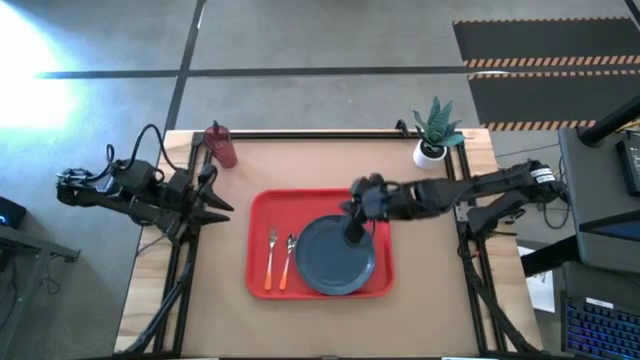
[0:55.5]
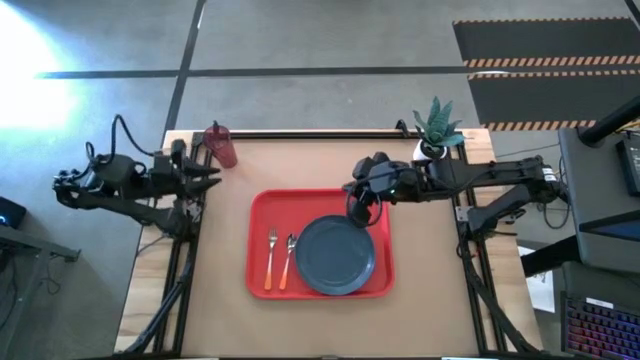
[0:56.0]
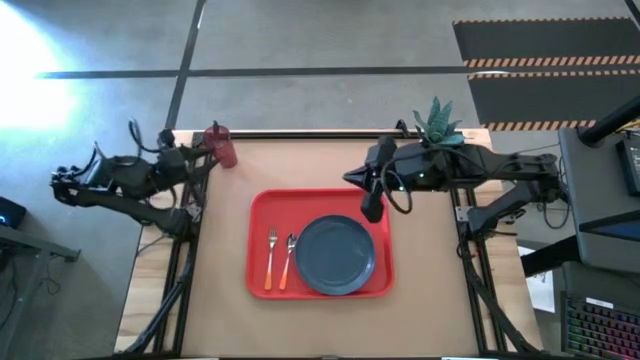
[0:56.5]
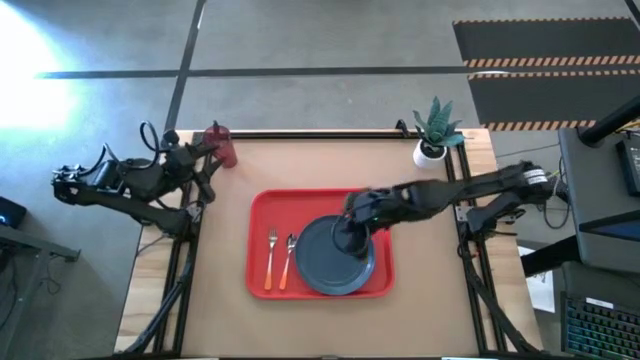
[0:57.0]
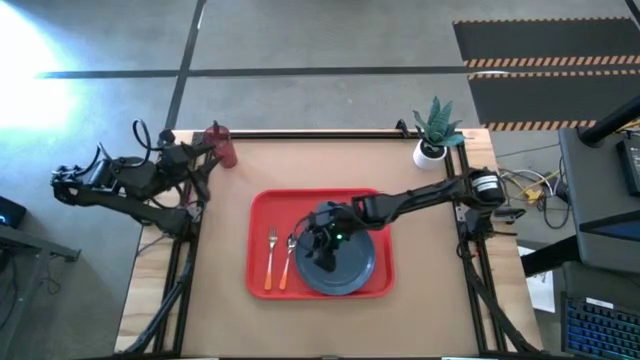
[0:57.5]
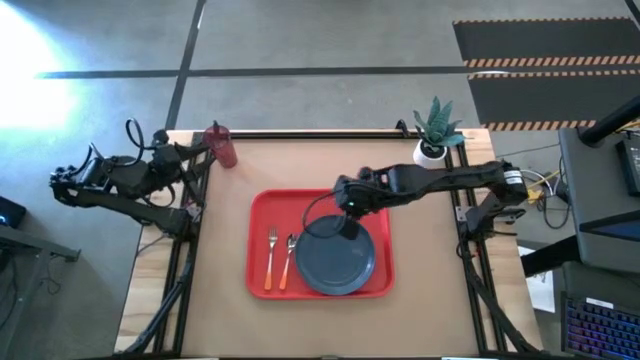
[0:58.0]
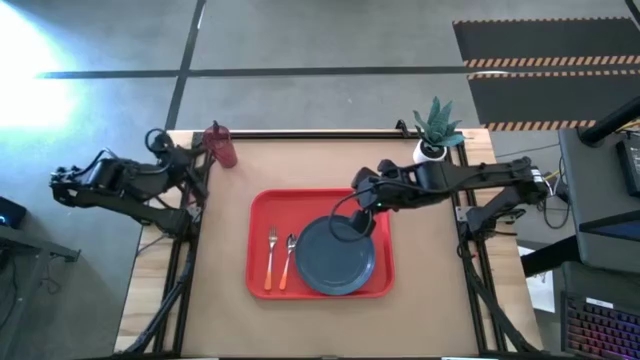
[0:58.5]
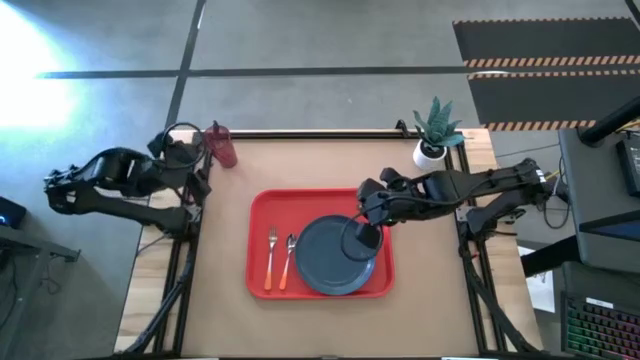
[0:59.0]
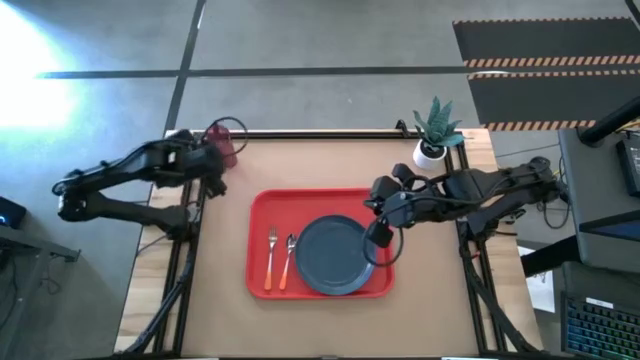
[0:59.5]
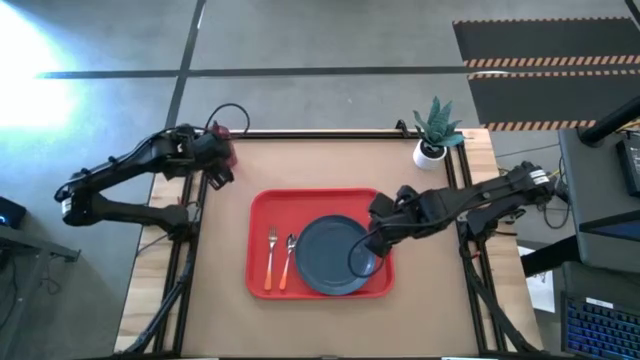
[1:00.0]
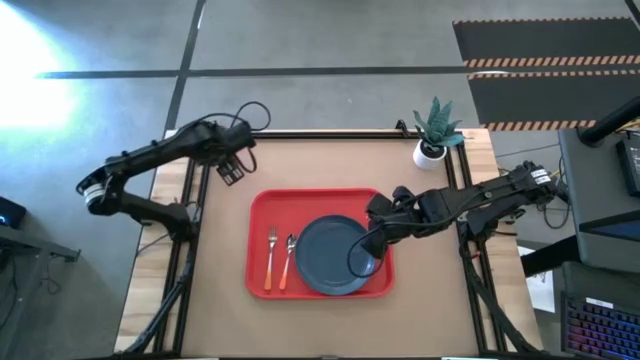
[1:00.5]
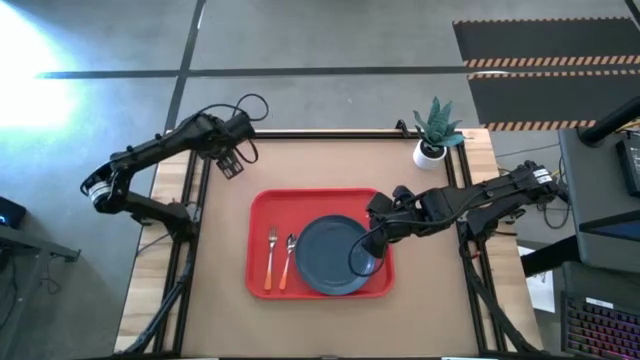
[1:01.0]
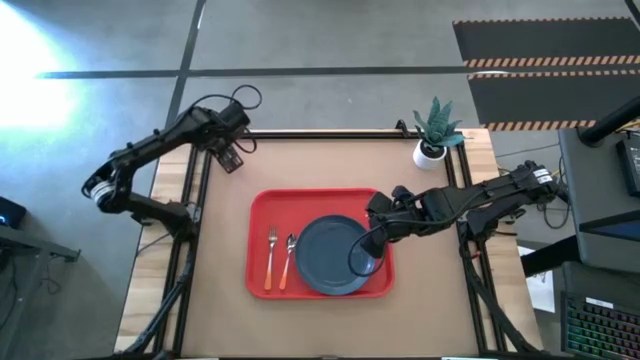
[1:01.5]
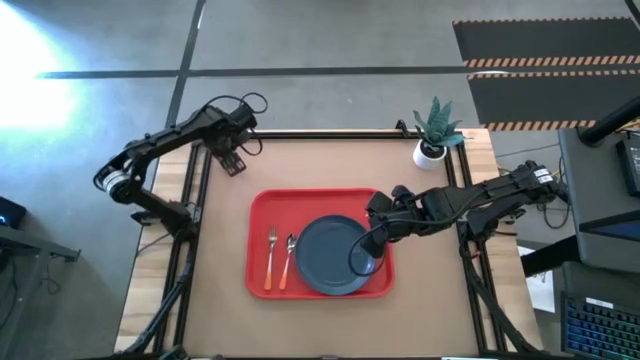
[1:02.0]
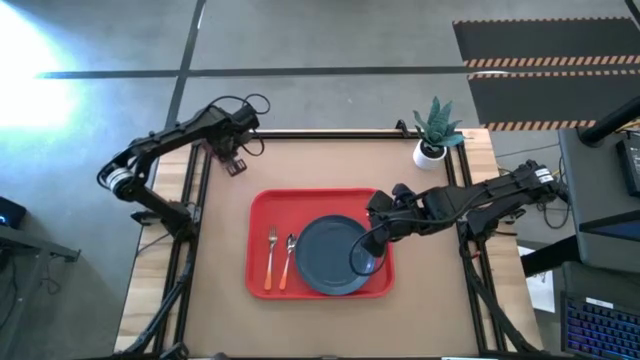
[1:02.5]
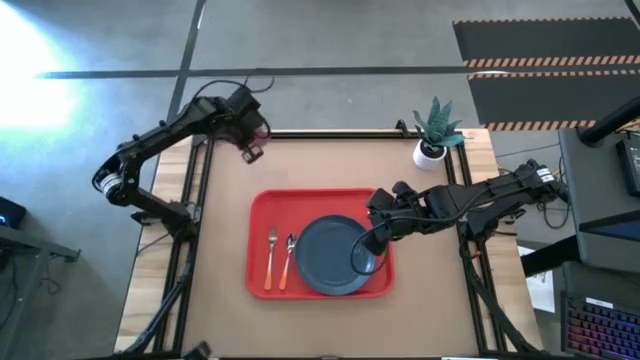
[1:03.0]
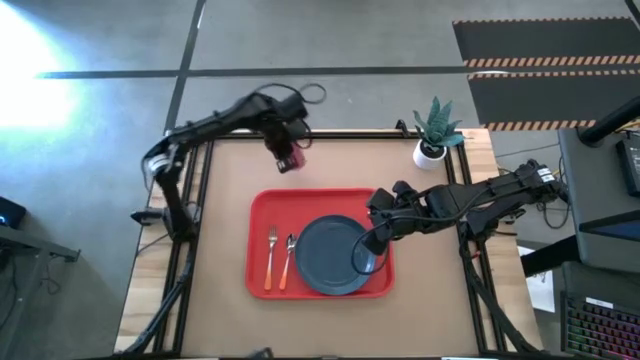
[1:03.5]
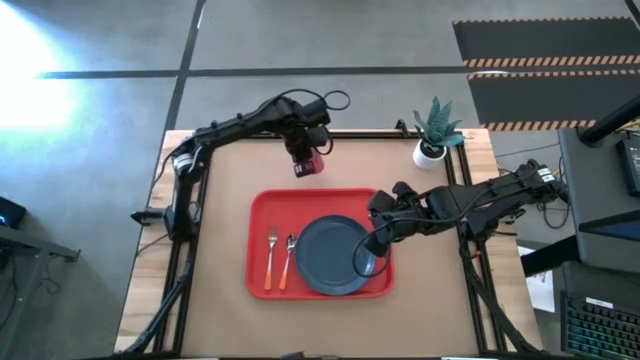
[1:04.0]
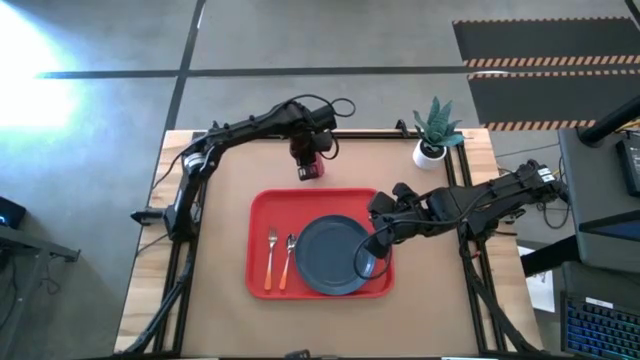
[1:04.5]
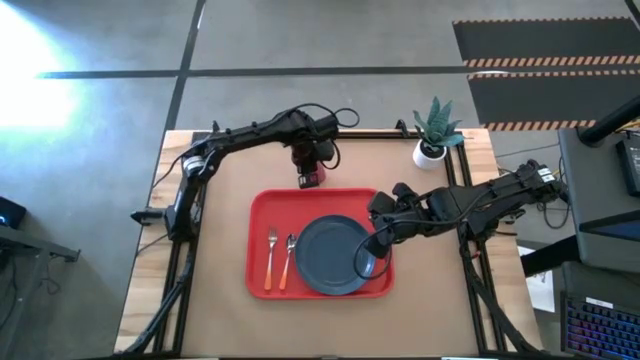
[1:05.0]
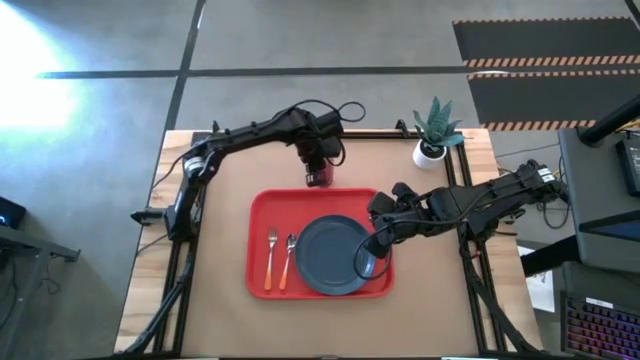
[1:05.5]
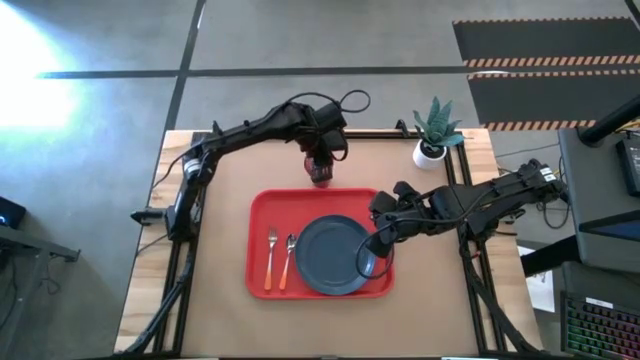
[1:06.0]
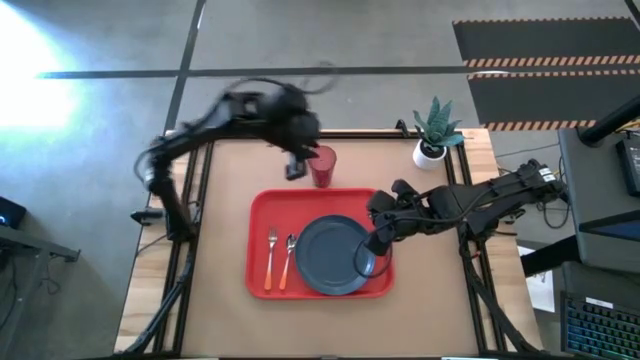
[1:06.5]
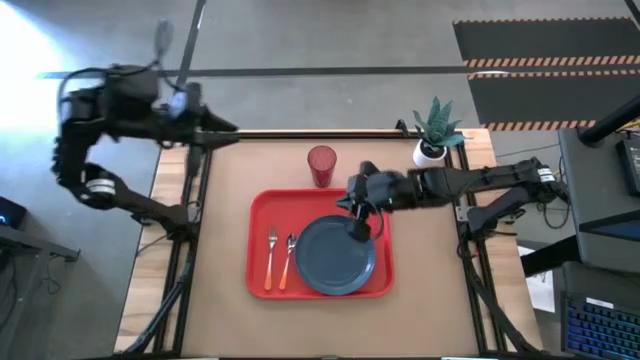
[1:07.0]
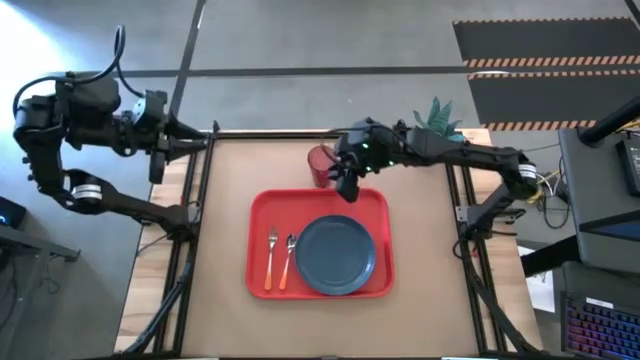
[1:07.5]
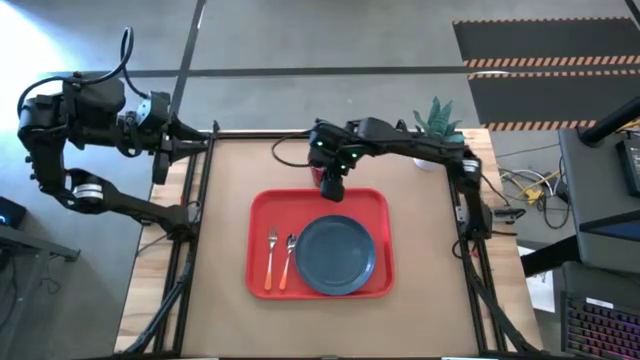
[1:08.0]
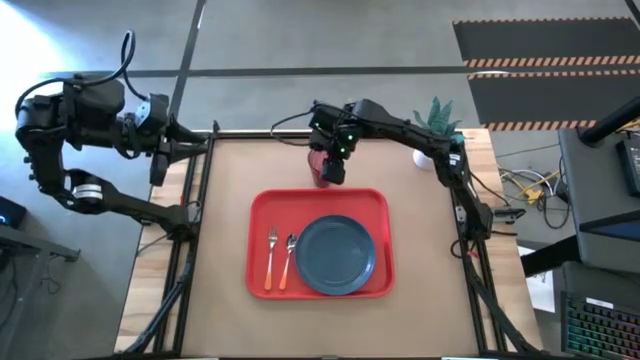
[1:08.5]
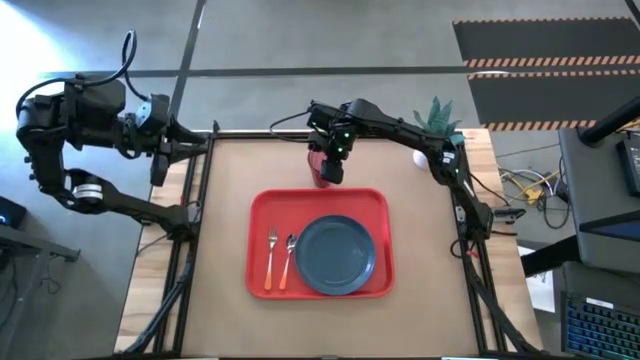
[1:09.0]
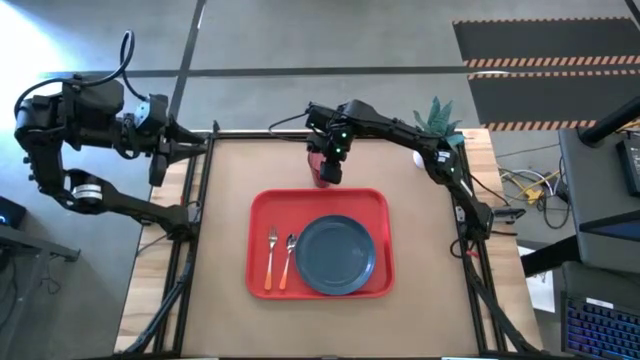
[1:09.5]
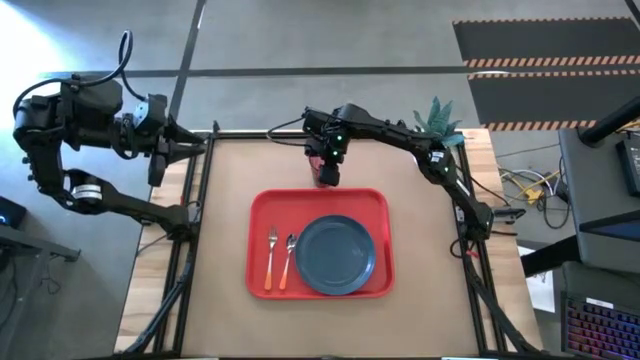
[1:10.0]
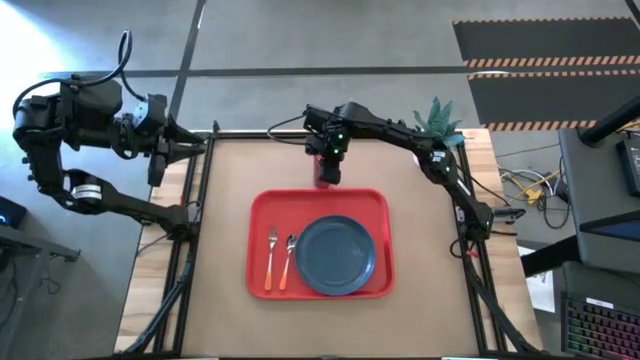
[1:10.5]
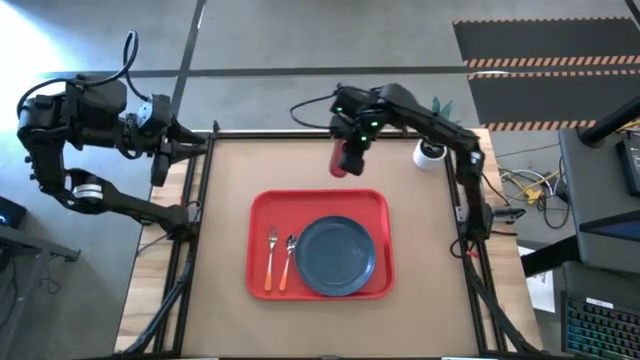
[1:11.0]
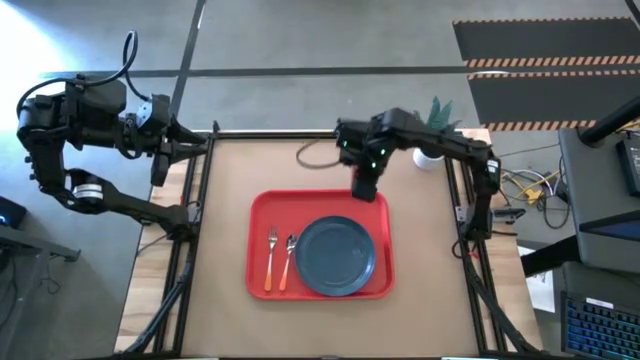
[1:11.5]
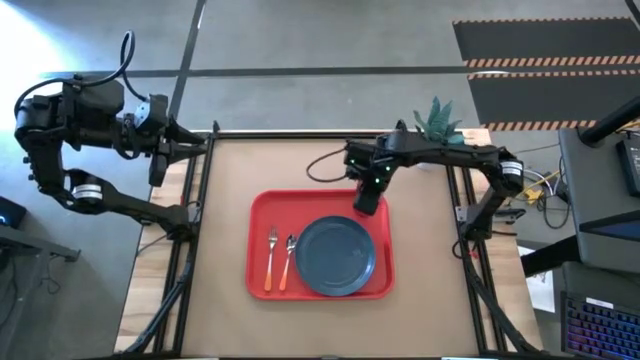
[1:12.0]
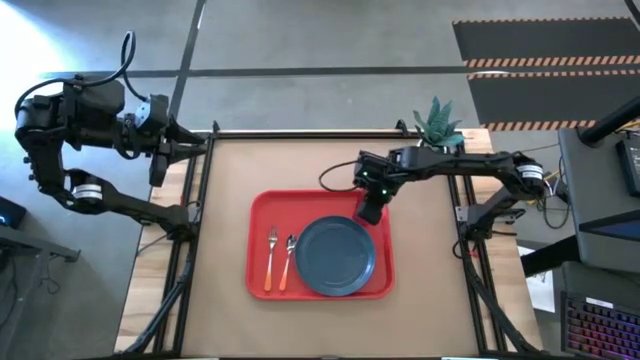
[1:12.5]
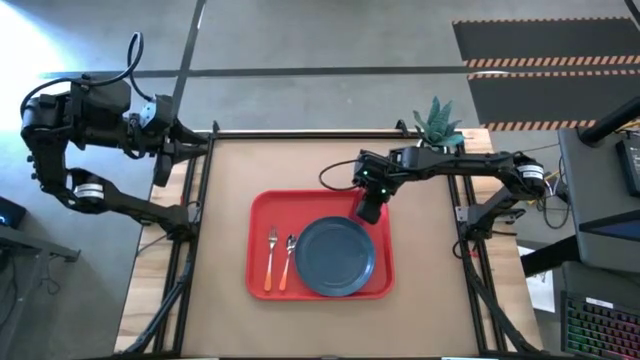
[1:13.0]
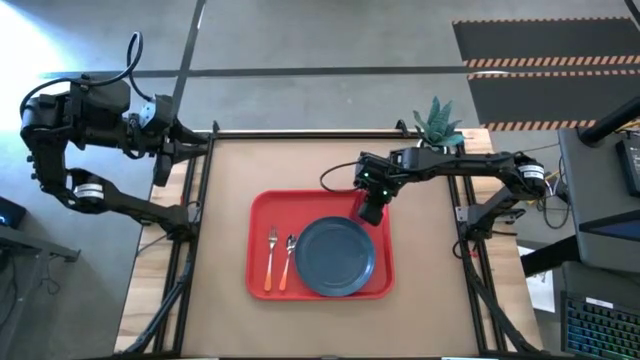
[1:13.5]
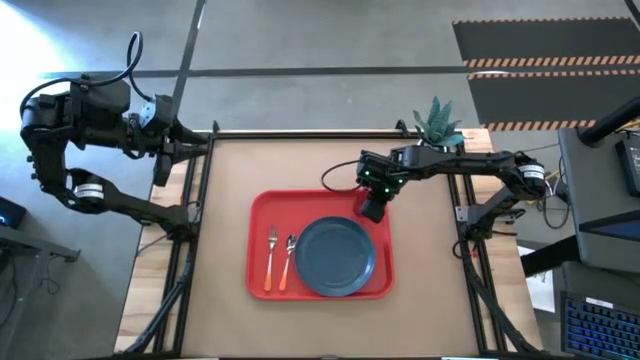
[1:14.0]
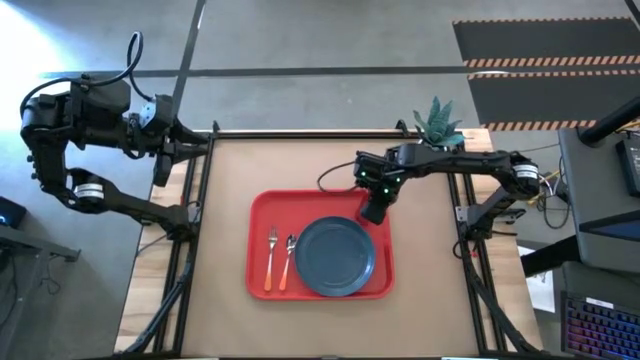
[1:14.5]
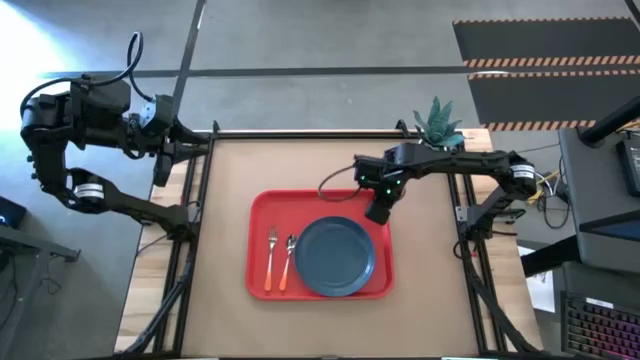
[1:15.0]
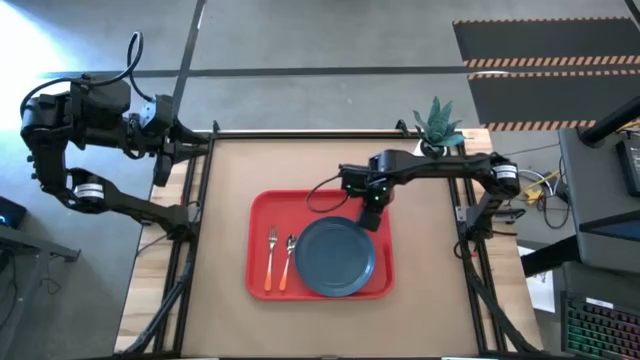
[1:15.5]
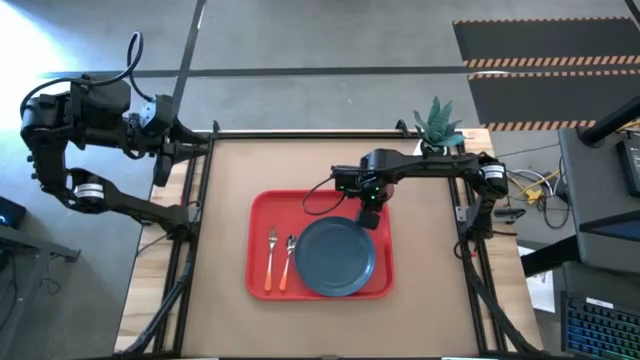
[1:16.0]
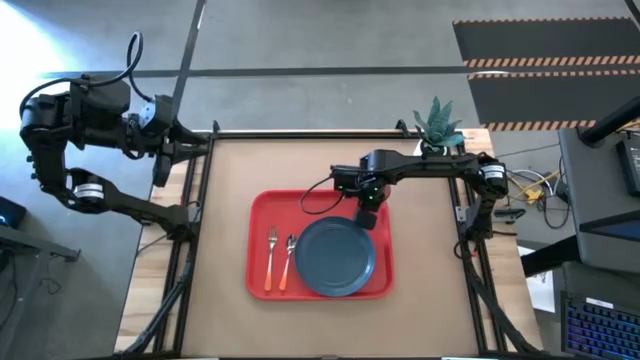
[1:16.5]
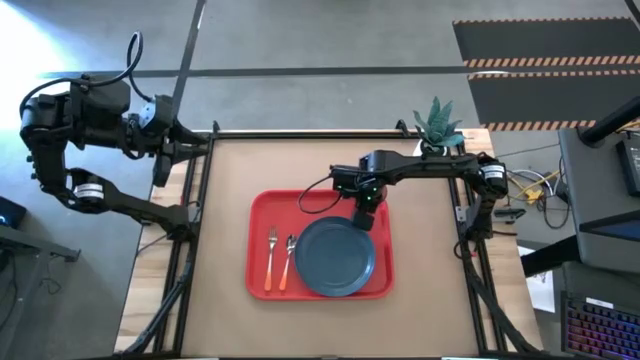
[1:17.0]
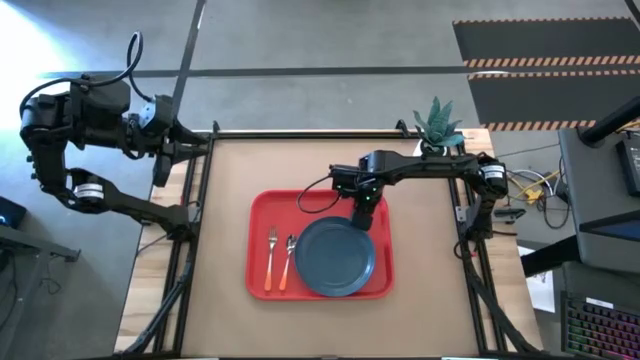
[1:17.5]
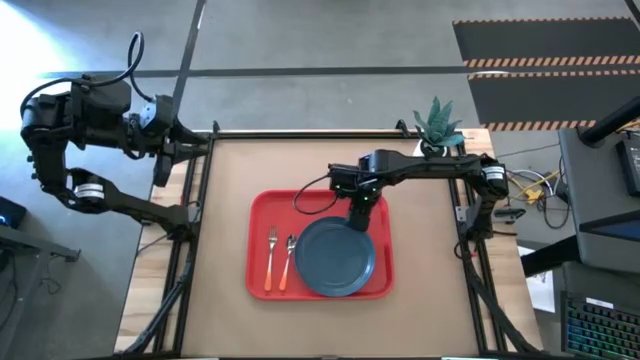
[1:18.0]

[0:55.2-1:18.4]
Task: Pick and place plate/cup/fork/spoon on tray
Put the red glass on the orange serving tray to the top right of the blue plate
